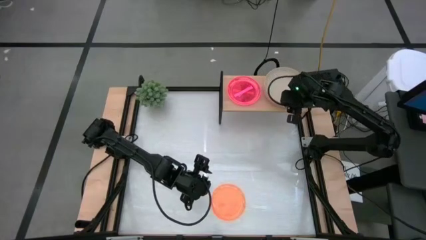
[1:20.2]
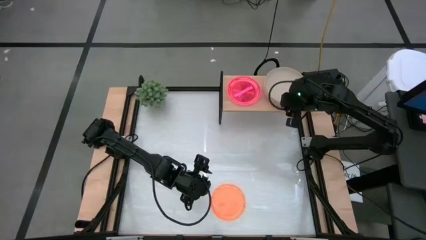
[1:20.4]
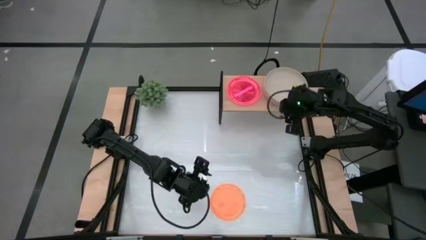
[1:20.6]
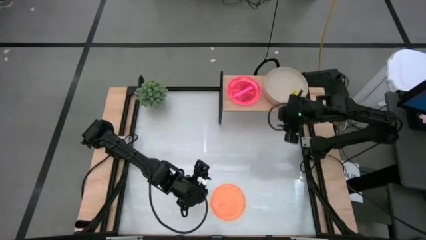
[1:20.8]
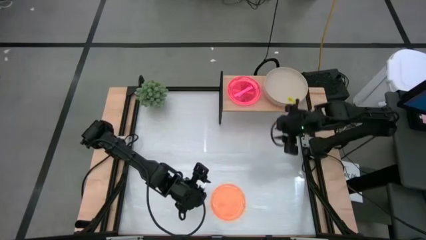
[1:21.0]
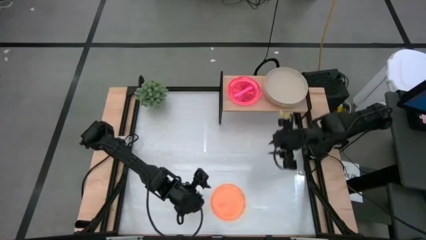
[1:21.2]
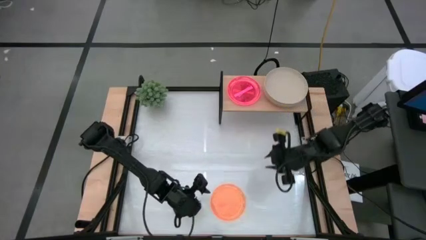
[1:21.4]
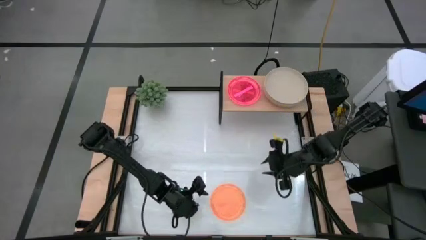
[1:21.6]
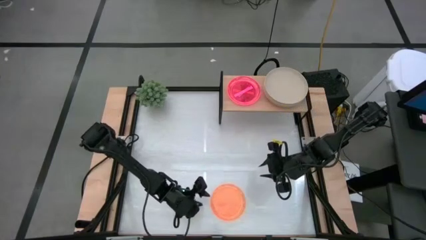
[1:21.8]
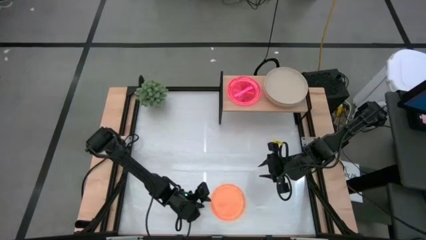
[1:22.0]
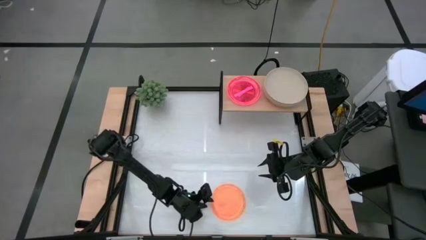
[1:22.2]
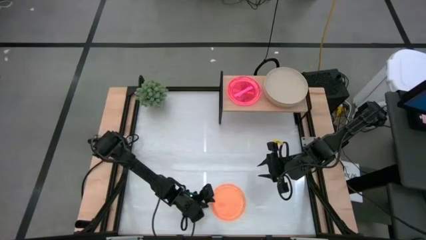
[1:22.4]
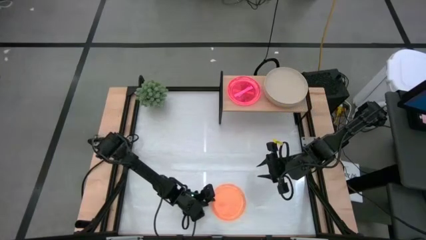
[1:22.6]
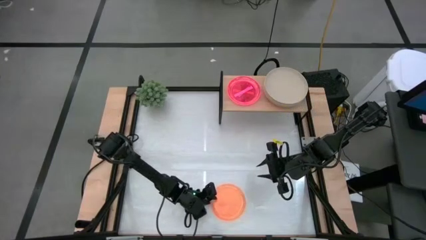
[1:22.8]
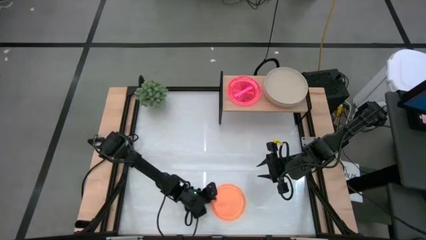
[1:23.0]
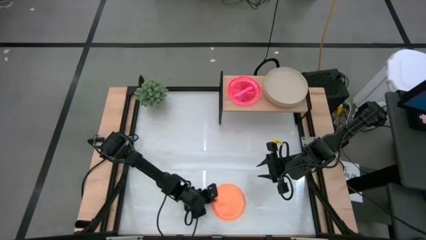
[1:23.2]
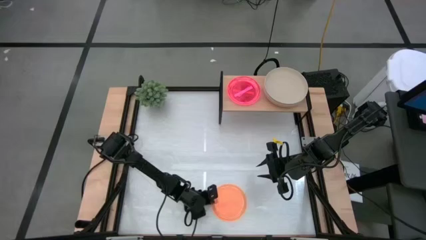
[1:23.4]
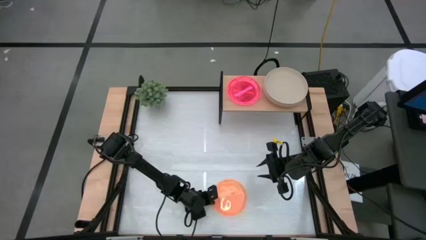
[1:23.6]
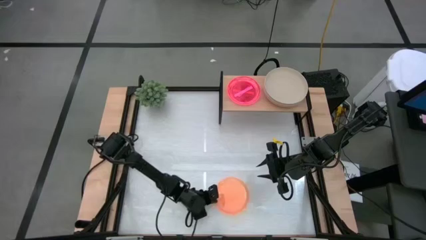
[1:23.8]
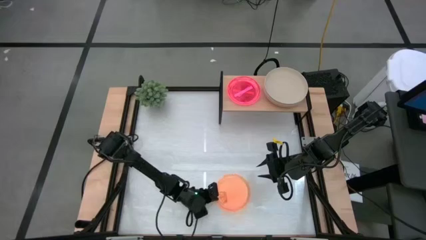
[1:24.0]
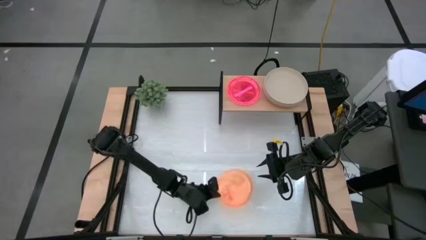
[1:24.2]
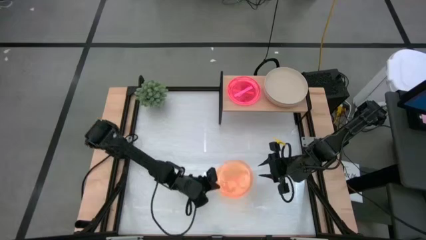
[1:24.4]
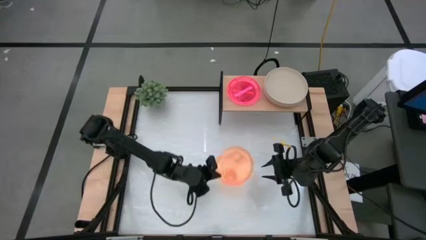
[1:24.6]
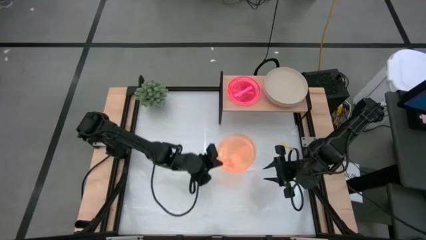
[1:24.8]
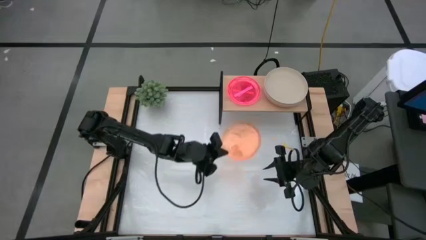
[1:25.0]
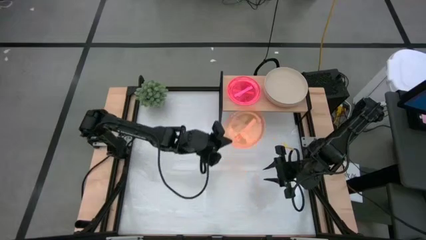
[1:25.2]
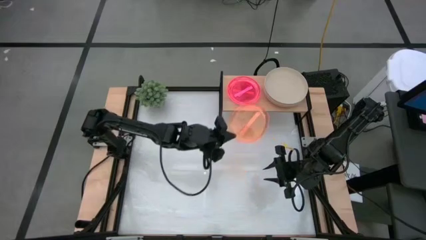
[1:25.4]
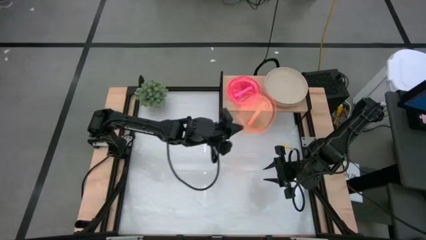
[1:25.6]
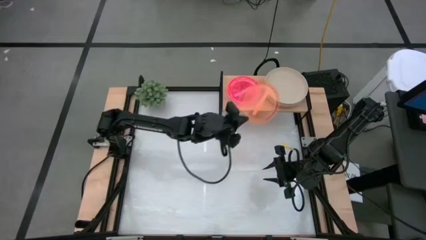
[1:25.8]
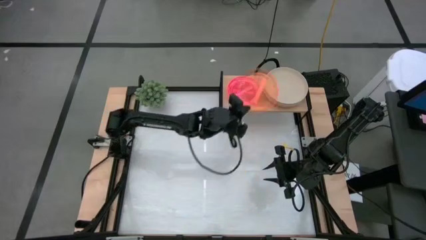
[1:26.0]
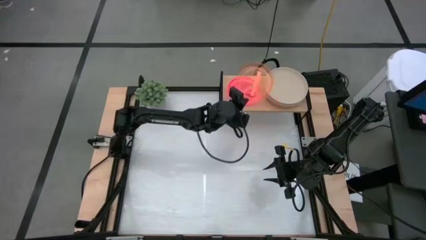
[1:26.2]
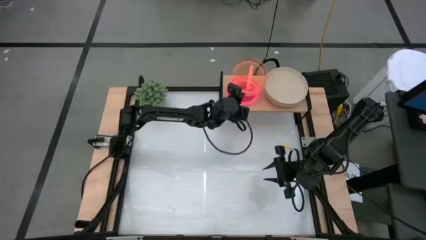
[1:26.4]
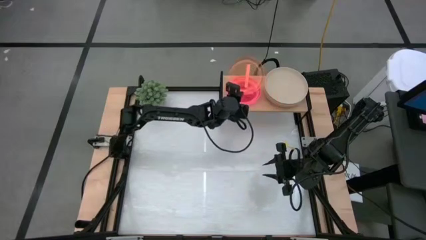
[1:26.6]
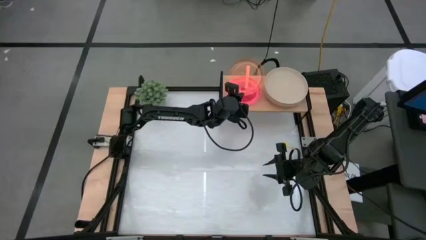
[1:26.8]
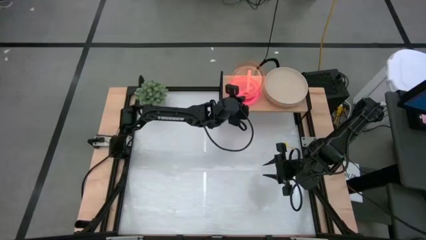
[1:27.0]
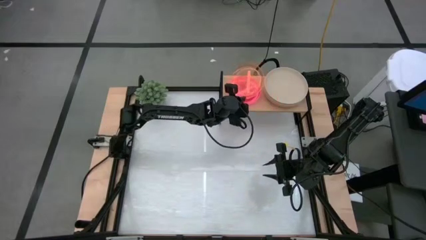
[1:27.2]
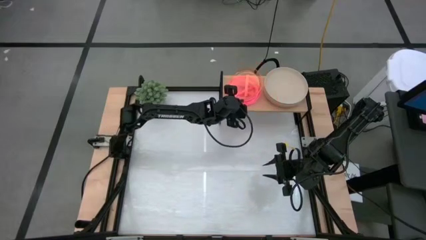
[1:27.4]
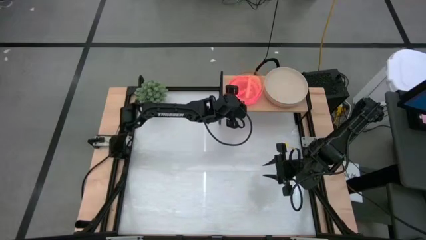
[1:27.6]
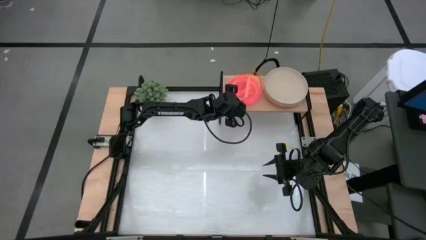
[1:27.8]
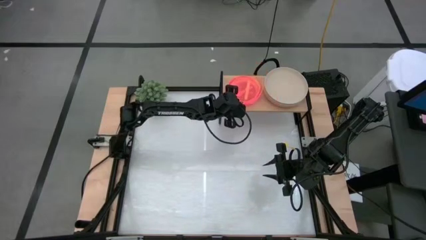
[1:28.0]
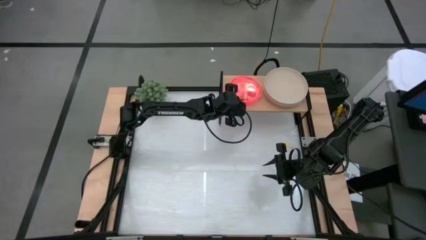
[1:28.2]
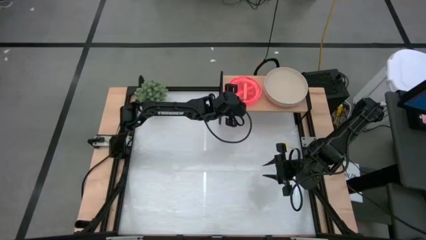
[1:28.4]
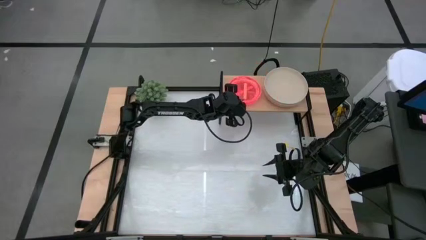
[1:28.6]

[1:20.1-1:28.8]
Task: Place and stack plates onto a shelf
Stack the orange plate on top of the pink plate on the shelf

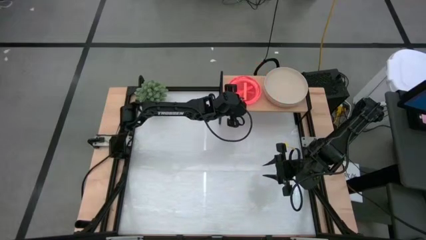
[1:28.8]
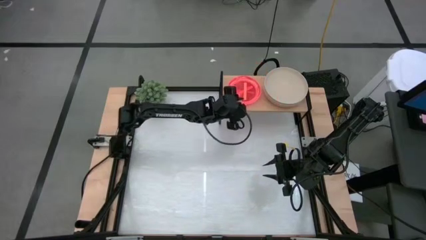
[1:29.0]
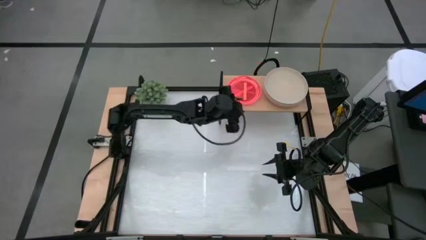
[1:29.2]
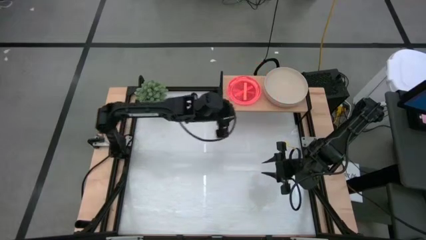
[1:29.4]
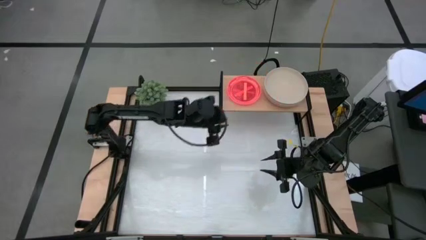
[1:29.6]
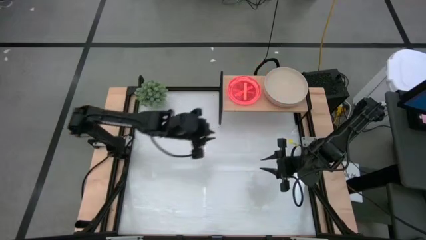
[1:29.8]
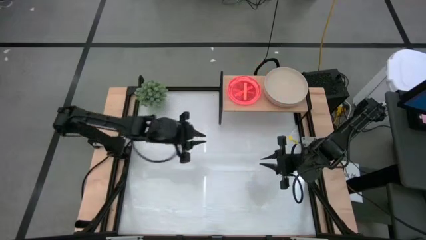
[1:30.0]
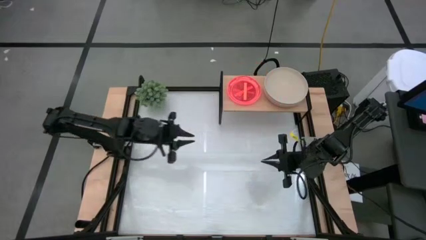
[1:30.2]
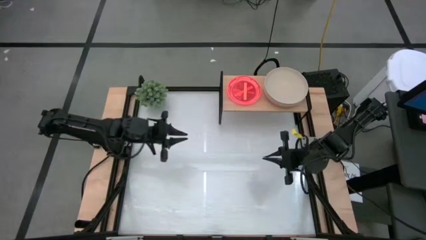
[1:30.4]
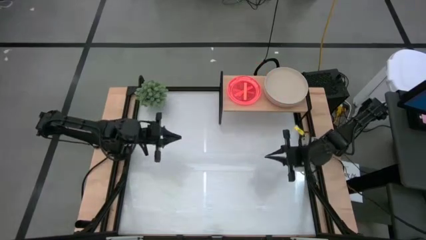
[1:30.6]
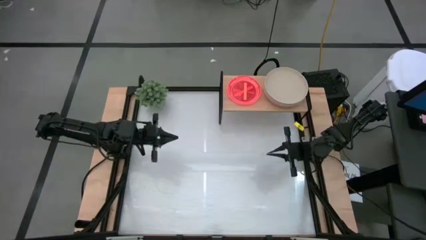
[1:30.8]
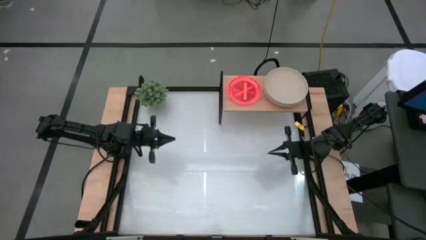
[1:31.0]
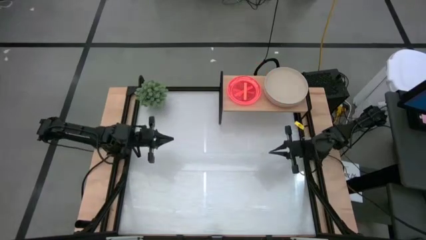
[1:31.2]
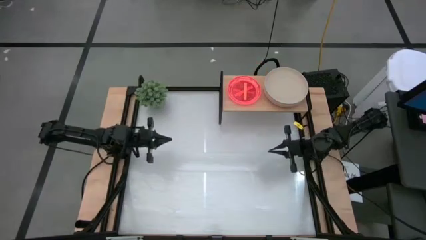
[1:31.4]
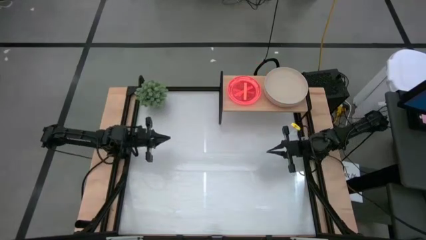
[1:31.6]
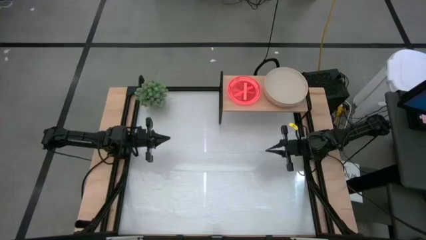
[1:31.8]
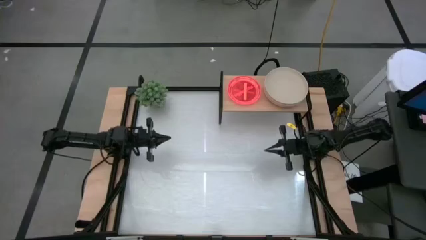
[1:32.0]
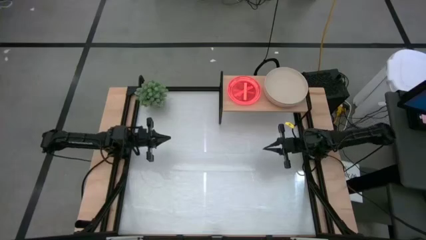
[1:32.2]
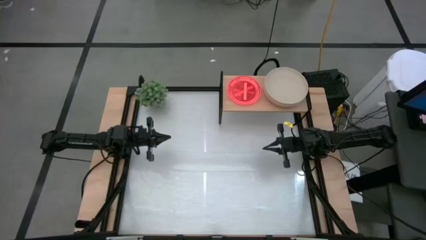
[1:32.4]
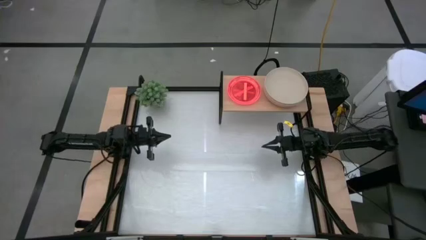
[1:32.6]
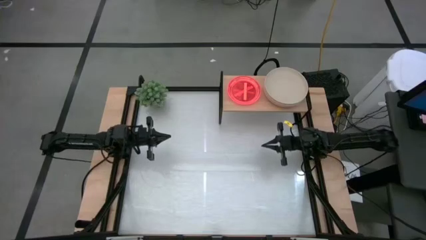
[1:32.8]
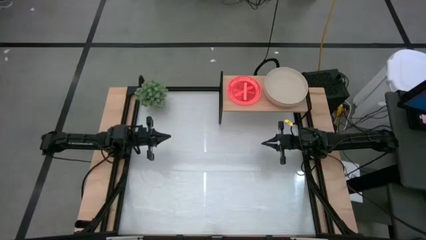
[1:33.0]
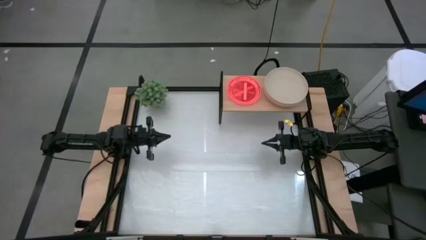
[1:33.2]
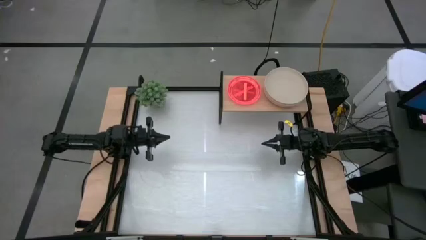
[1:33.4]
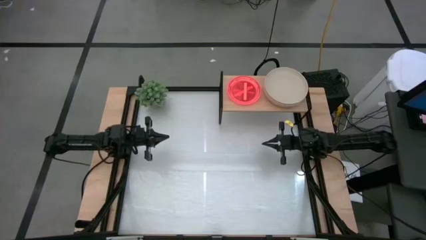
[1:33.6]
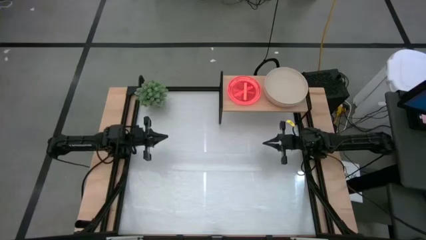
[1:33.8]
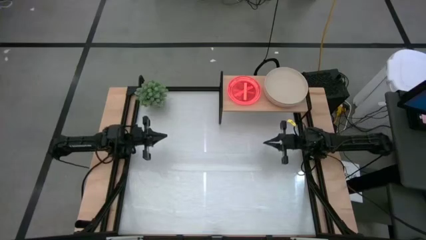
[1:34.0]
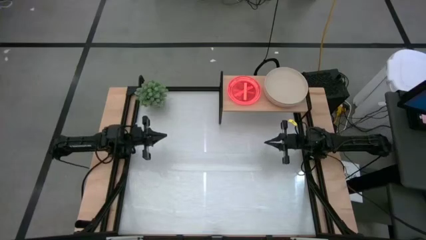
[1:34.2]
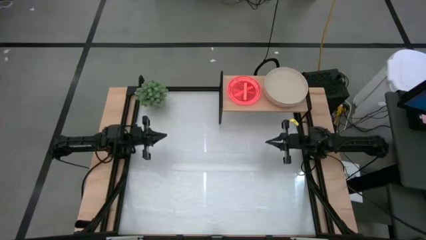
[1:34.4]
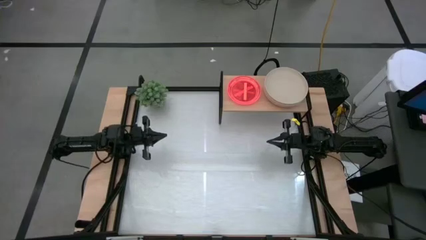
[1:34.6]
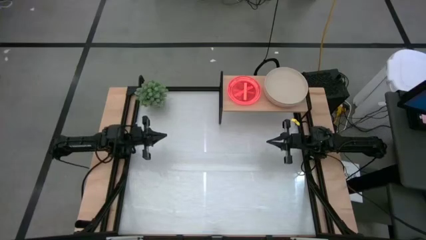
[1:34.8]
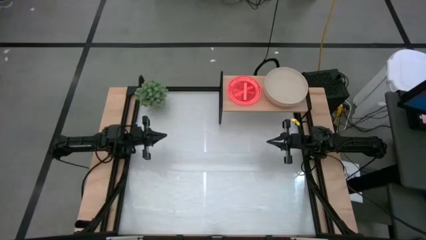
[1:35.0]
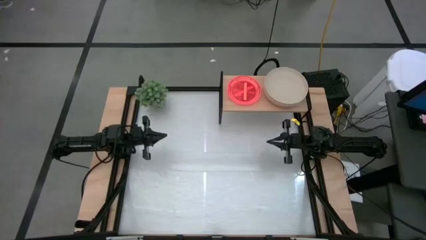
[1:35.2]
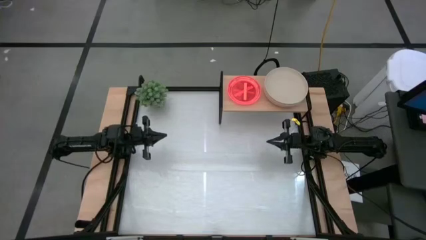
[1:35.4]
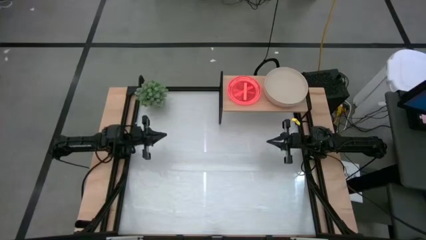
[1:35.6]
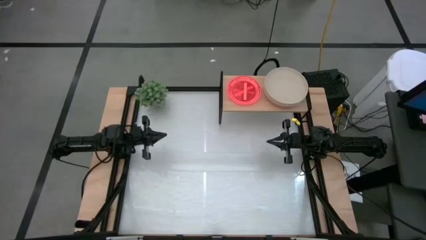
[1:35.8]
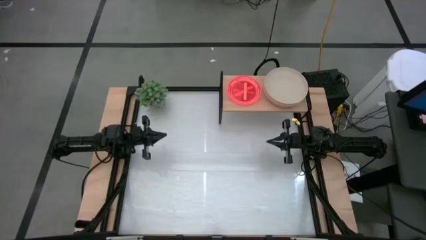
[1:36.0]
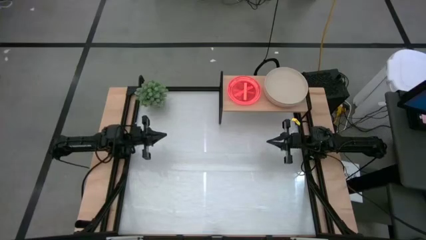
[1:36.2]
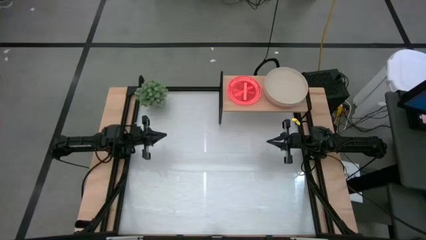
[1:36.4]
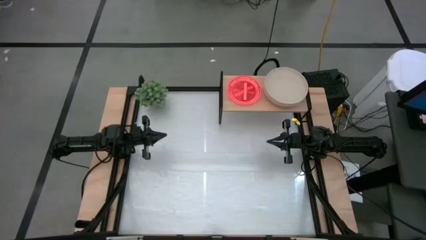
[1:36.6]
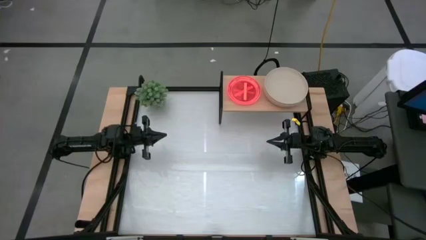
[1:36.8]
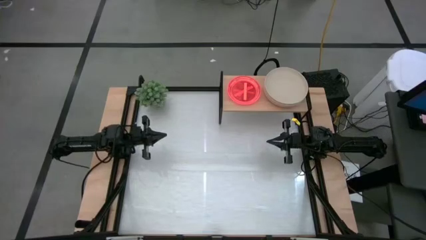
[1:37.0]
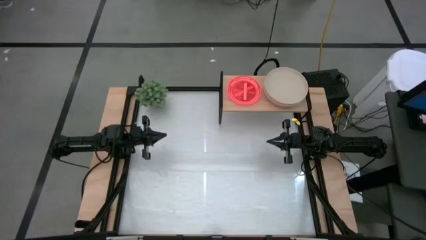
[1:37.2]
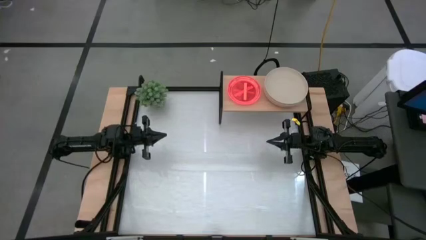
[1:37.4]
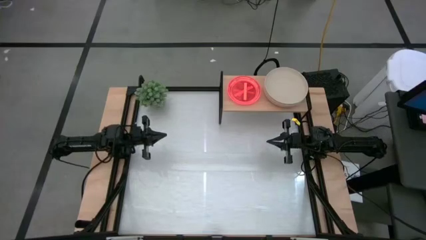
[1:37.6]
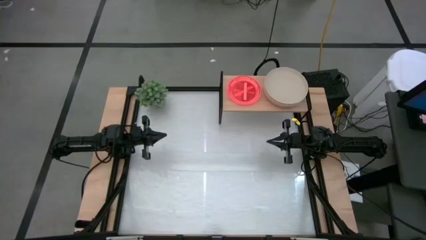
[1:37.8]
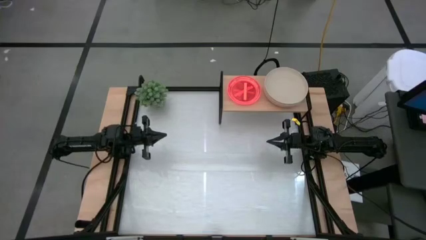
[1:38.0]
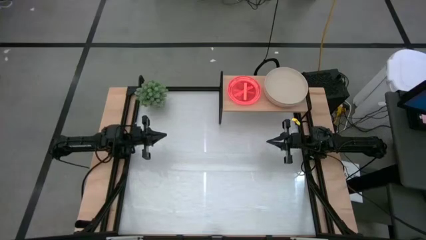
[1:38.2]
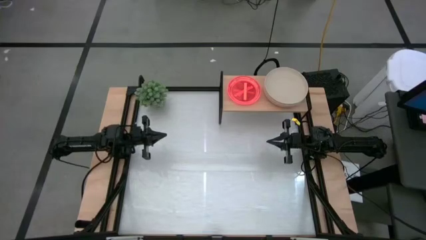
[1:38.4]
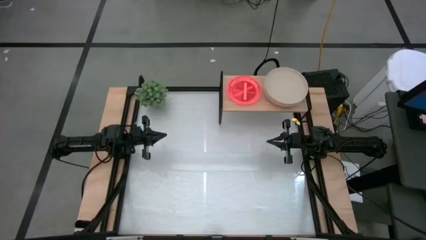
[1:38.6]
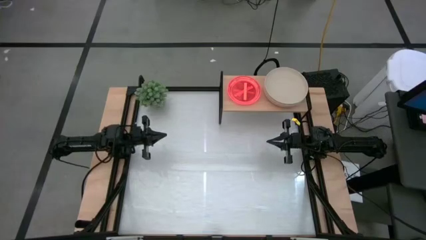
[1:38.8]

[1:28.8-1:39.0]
Return to Home Position
